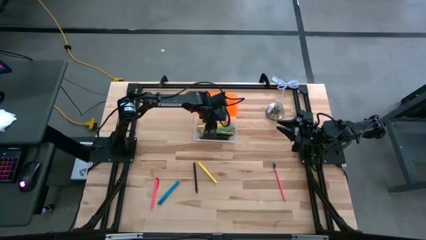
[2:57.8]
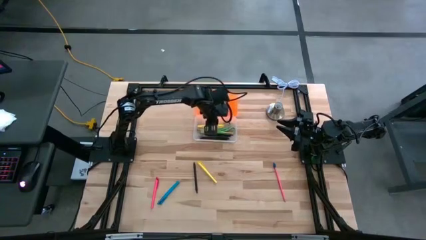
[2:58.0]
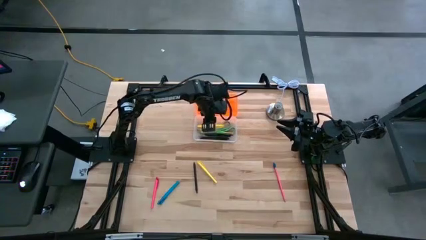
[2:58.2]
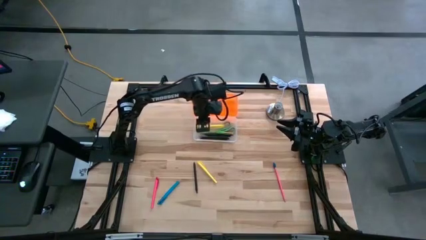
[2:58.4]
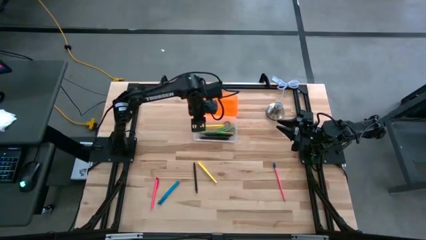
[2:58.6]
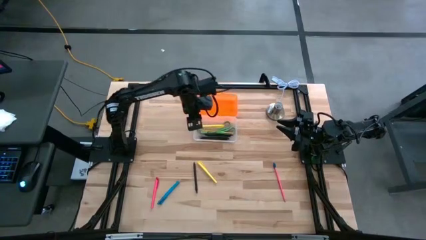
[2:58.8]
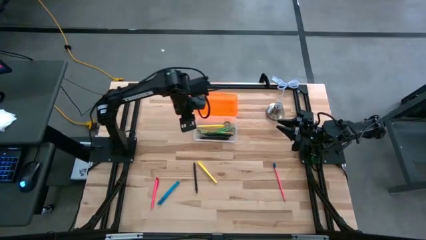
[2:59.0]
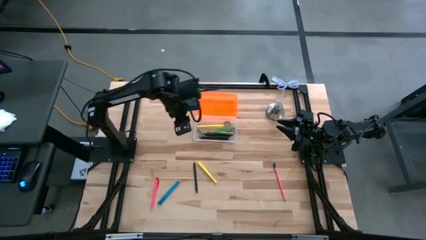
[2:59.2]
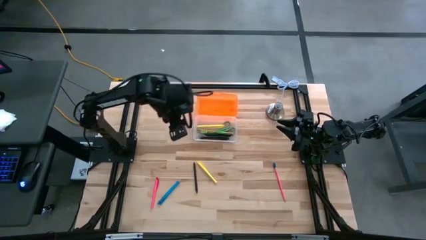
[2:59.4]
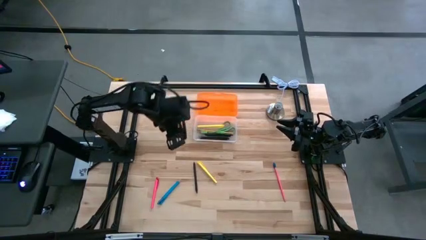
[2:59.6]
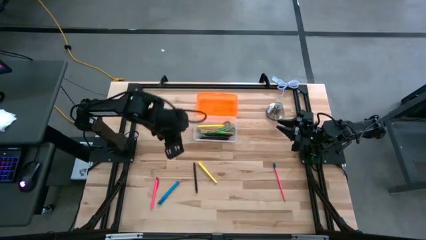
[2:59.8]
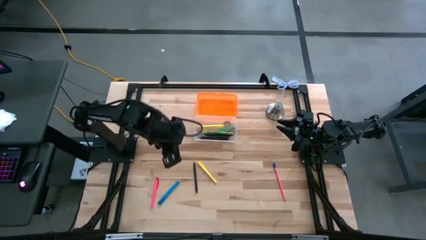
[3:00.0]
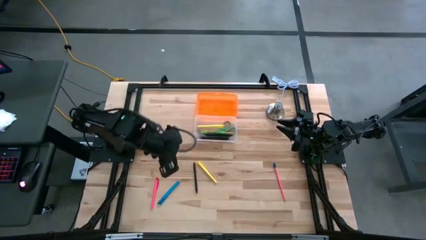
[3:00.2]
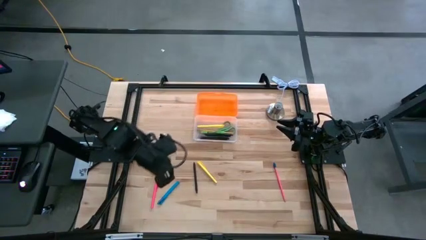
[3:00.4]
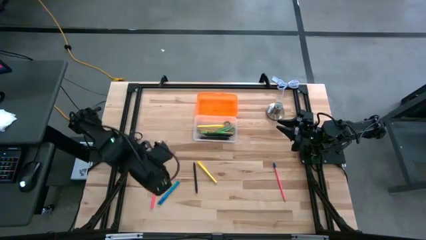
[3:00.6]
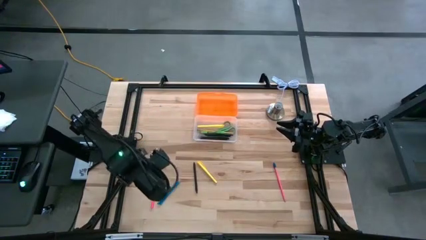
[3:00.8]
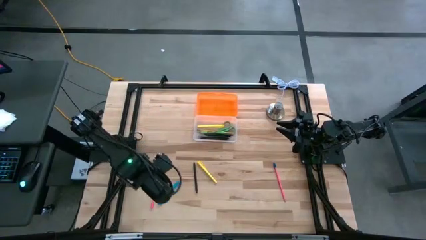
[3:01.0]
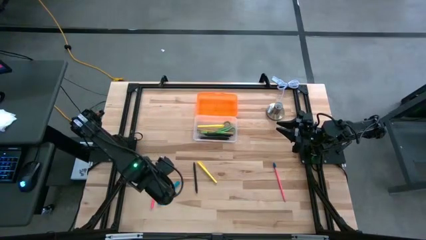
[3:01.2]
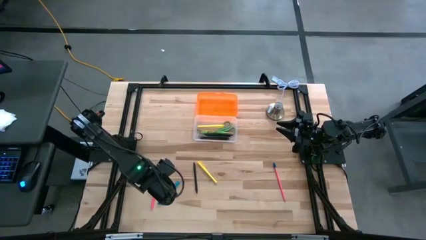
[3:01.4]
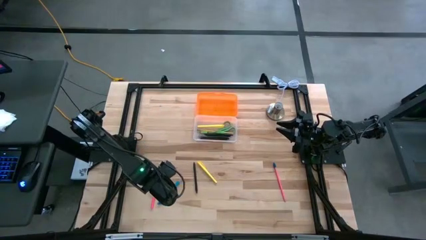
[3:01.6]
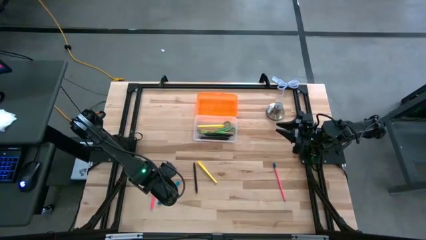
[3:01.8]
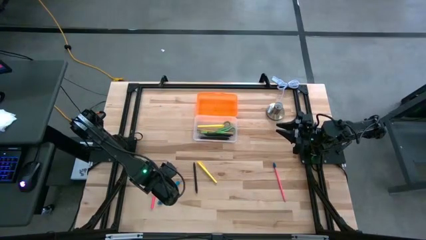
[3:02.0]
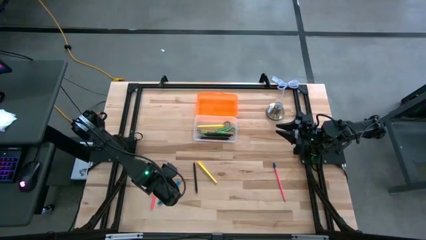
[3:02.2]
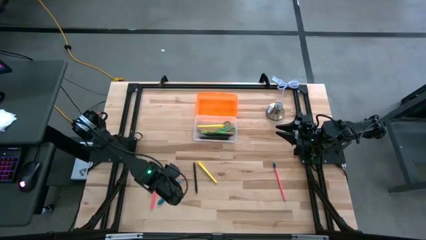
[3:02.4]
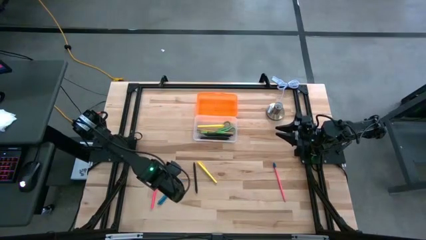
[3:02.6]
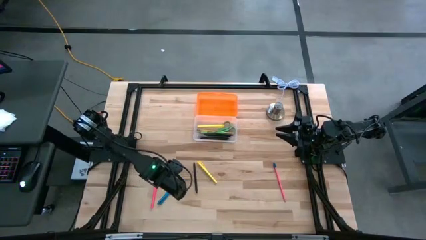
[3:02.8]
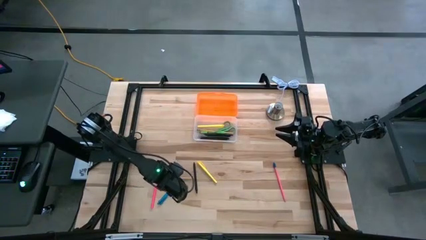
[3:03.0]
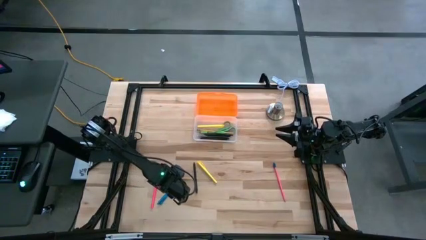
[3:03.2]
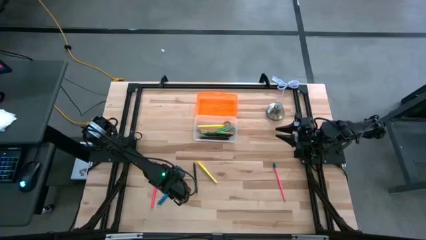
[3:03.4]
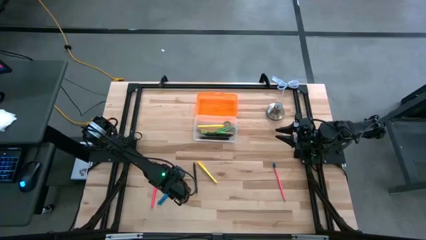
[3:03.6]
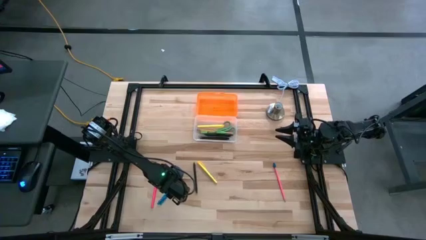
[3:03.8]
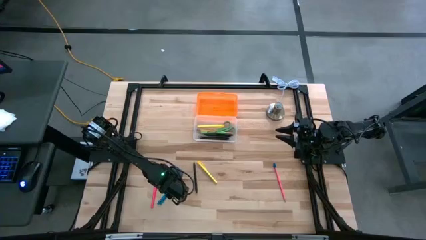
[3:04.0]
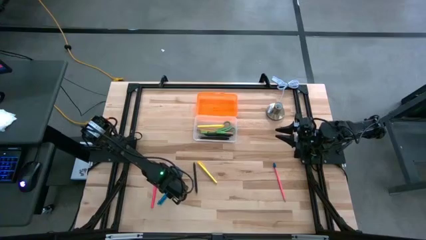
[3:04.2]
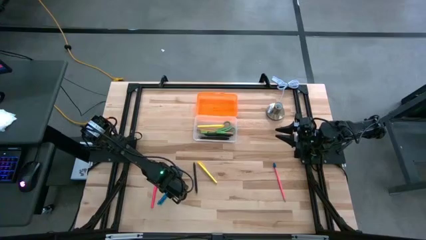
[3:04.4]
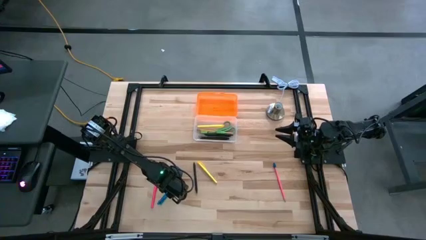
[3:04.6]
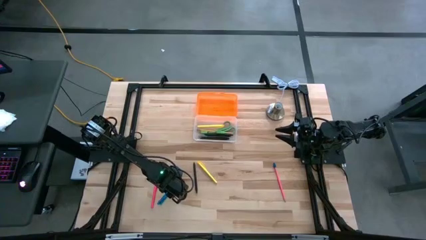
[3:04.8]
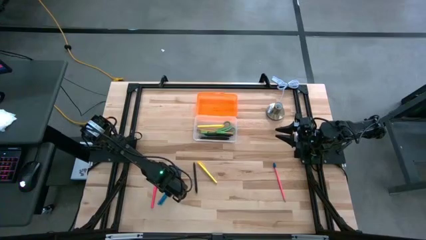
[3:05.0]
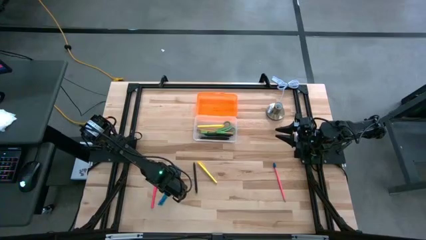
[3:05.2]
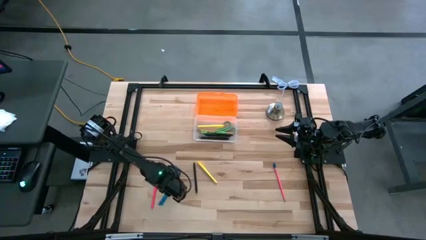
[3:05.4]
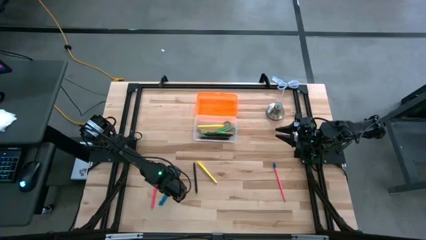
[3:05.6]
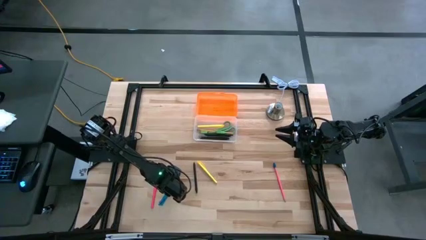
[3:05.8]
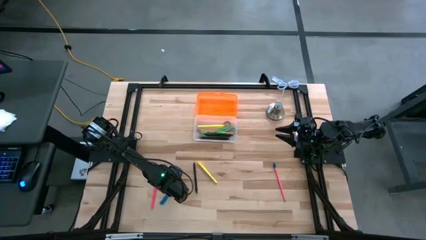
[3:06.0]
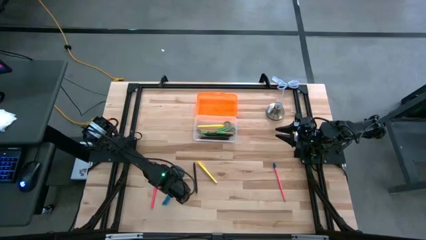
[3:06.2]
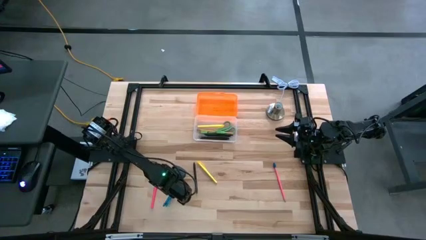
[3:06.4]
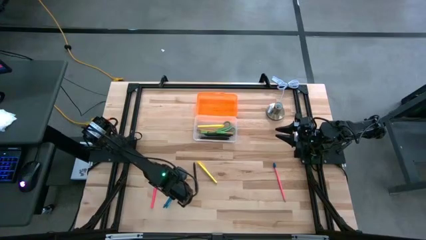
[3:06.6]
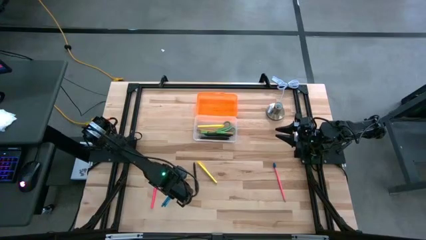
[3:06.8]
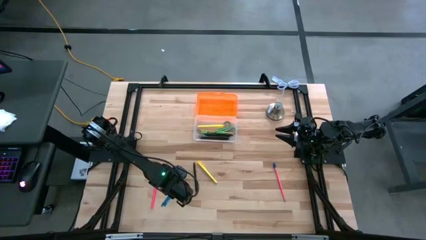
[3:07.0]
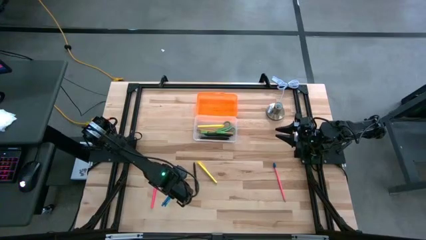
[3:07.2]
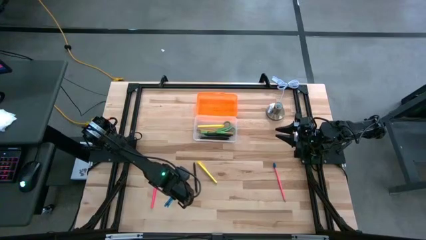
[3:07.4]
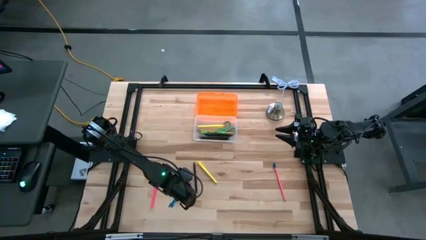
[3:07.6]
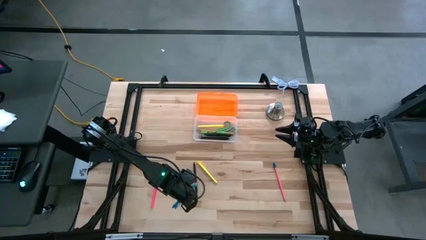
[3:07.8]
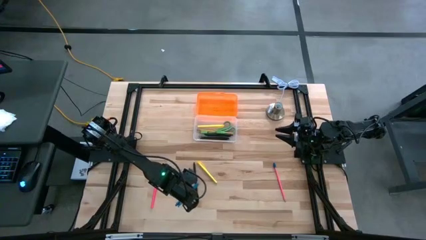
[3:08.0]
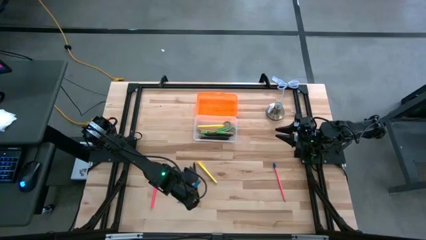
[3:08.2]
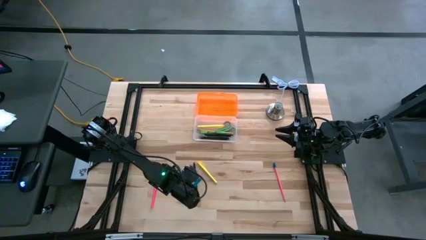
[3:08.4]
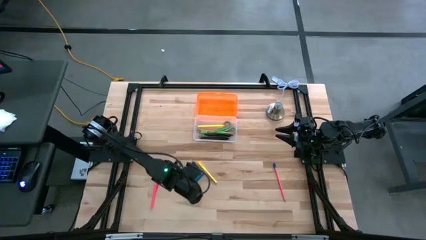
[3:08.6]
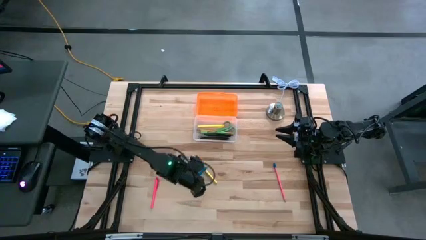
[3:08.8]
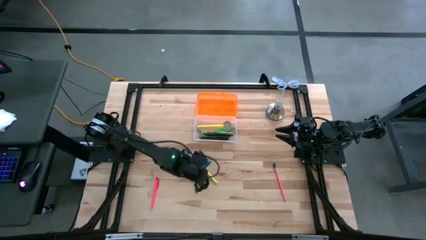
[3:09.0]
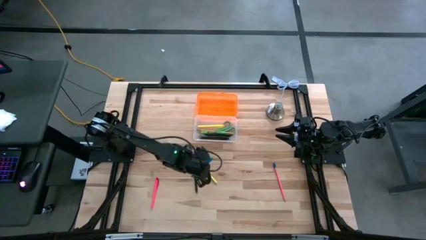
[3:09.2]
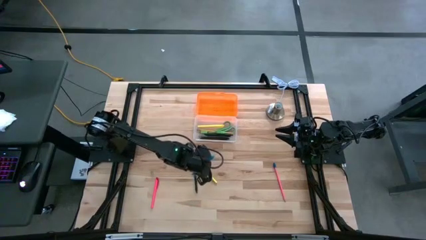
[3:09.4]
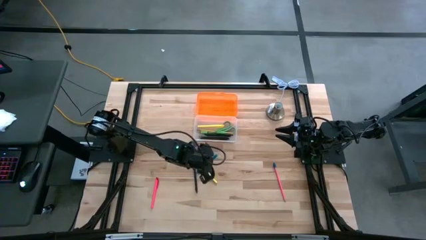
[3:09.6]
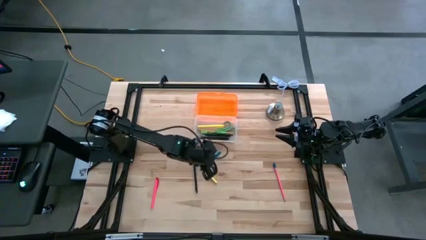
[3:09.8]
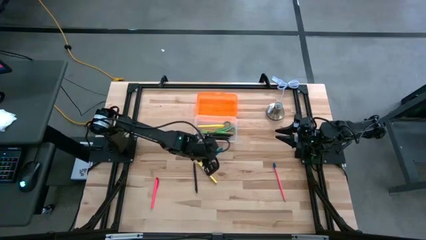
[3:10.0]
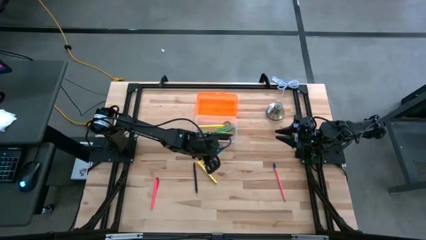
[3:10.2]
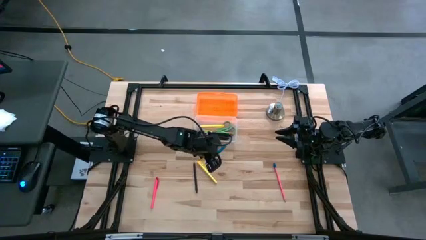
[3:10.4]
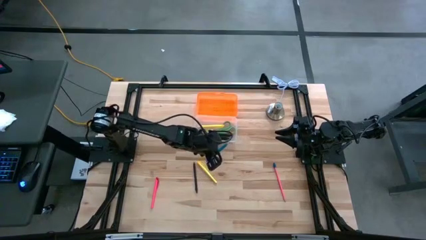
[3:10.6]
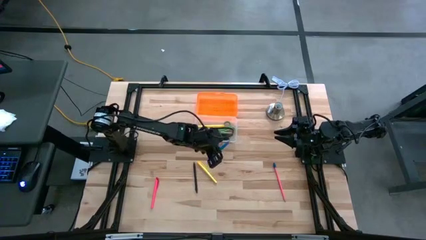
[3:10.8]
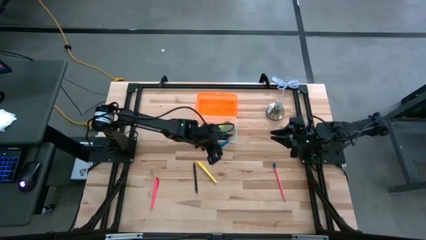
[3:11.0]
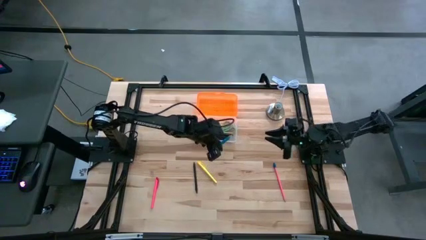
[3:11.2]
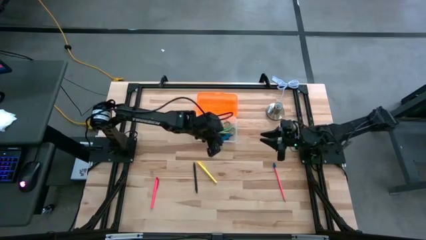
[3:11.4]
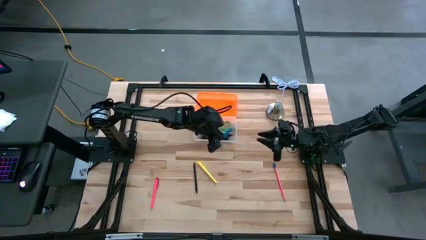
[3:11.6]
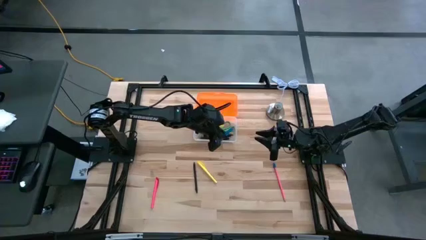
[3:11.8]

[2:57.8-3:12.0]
Task: Pick & place school supplies into a supply box
Put the blue pen into the orange supply box

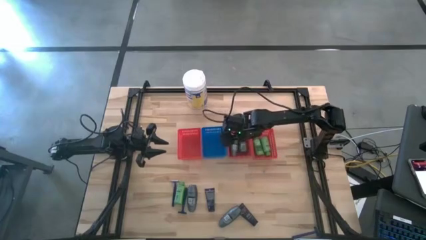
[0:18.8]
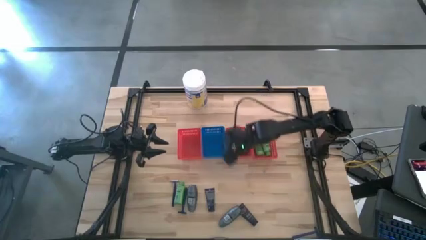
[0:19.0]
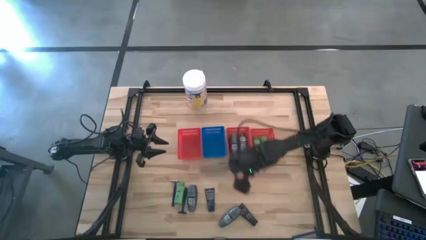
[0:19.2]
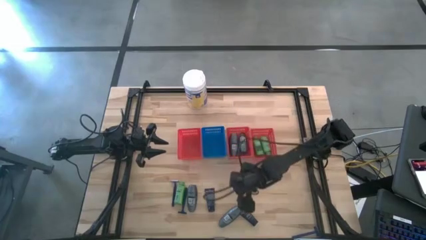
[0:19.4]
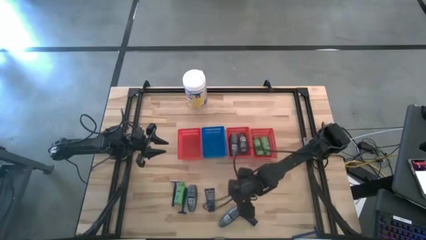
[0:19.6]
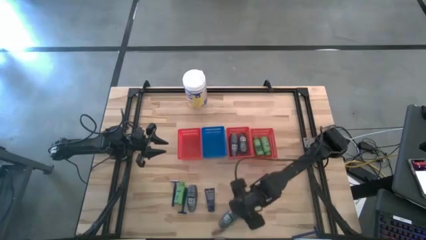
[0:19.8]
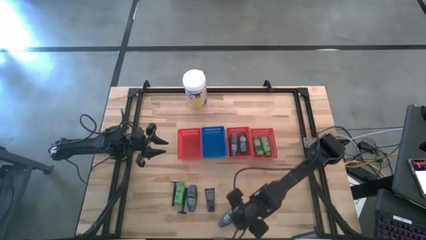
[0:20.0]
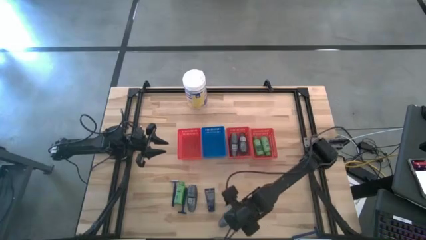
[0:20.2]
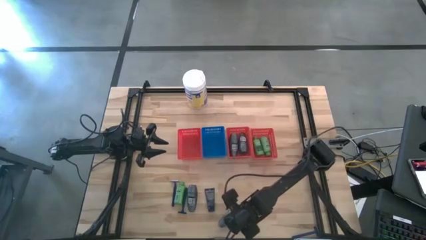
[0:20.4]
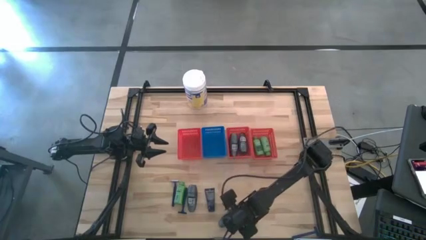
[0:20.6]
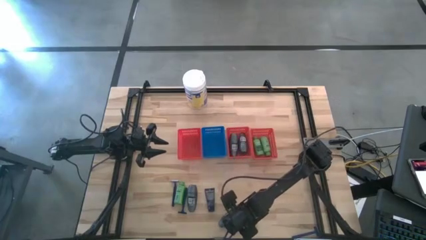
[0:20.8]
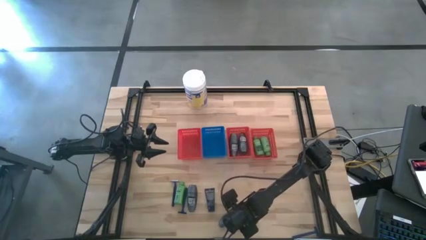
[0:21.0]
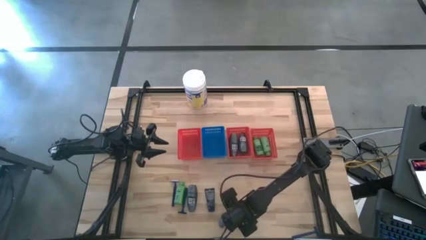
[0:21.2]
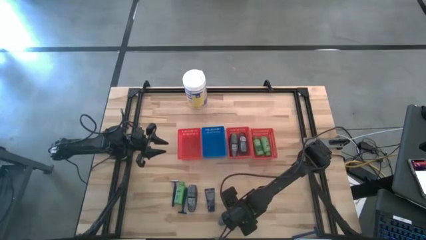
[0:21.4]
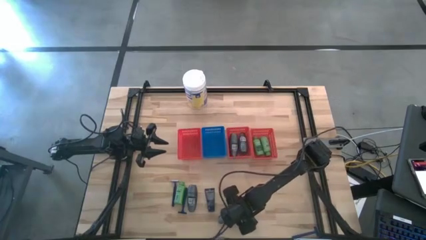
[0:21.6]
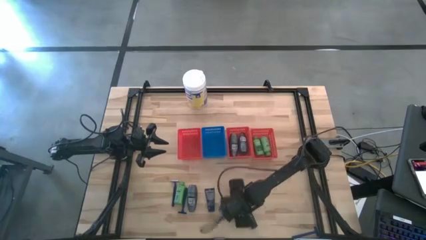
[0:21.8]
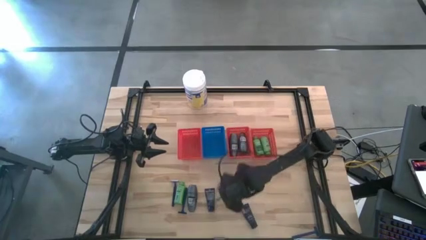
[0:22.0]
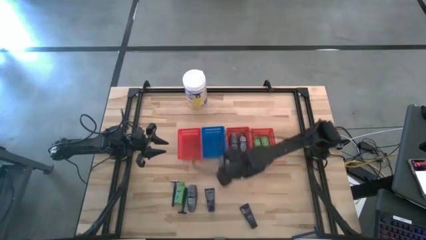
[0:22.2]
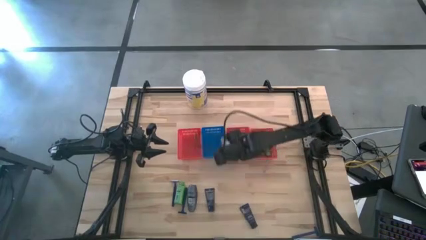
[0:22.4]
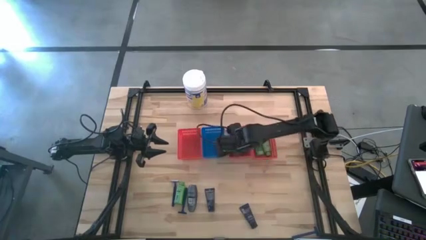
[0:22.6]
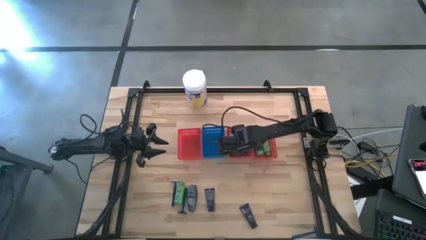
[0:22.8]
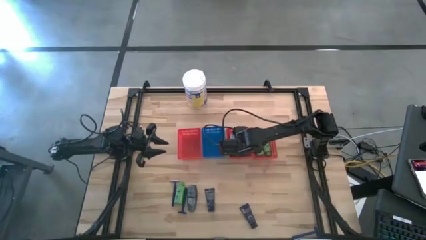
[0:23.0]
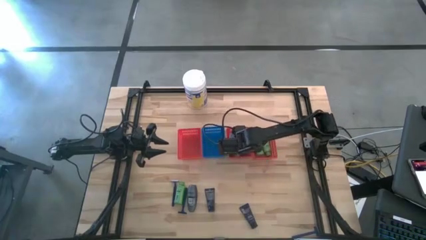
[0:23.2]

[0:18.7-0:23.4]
Task: Pick & Place Travel size toiletries
Put the bottom gray deodorant into the middle red bin
